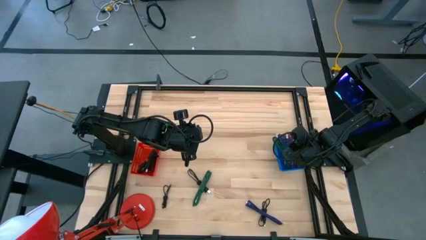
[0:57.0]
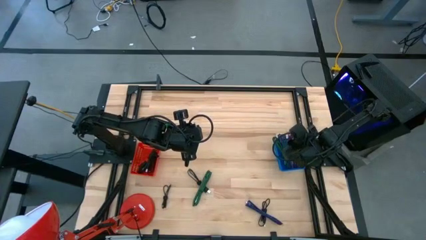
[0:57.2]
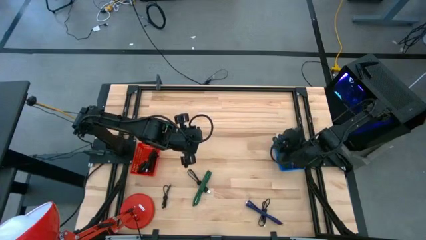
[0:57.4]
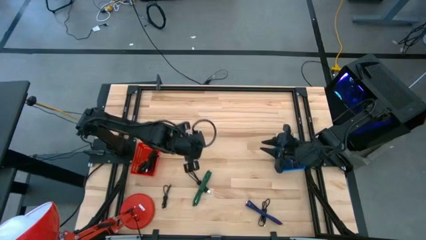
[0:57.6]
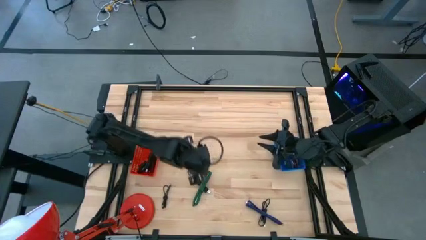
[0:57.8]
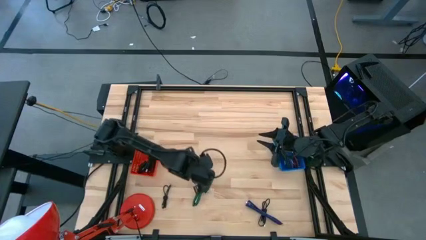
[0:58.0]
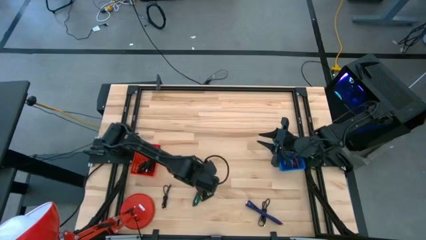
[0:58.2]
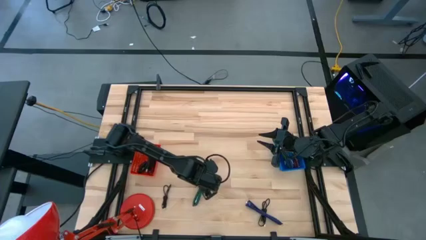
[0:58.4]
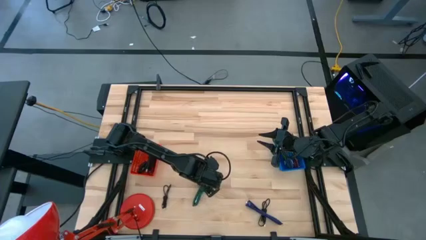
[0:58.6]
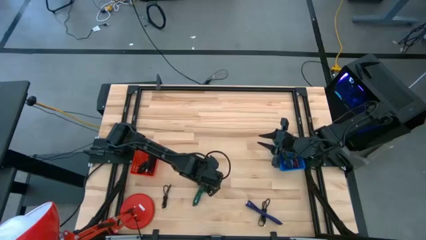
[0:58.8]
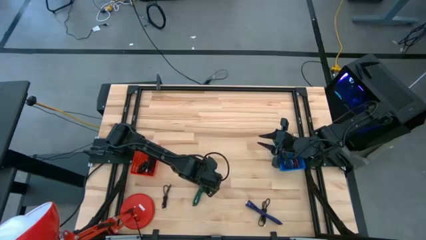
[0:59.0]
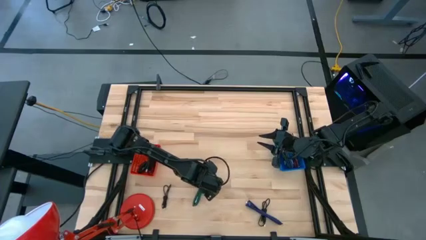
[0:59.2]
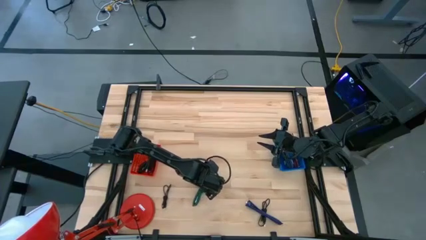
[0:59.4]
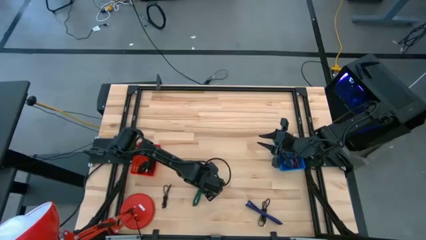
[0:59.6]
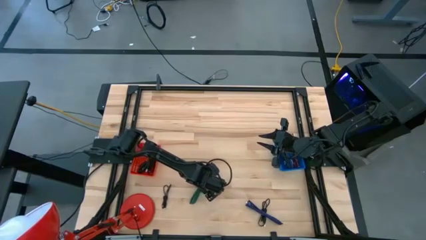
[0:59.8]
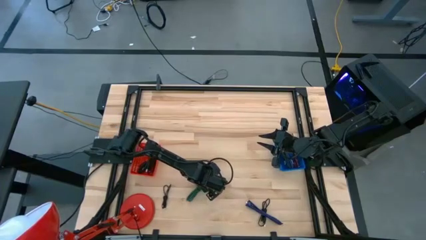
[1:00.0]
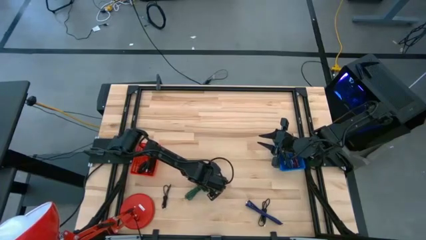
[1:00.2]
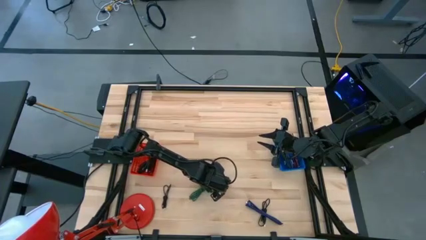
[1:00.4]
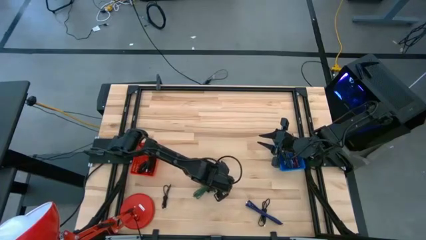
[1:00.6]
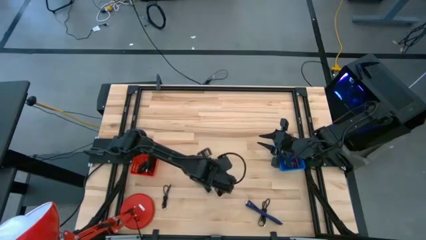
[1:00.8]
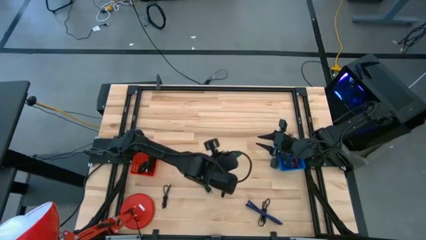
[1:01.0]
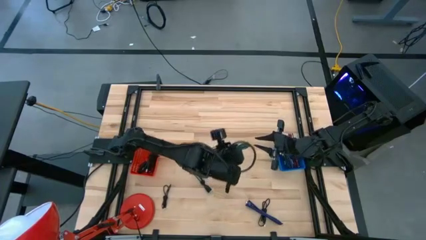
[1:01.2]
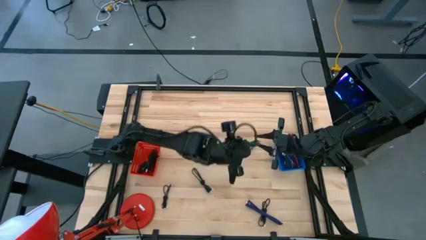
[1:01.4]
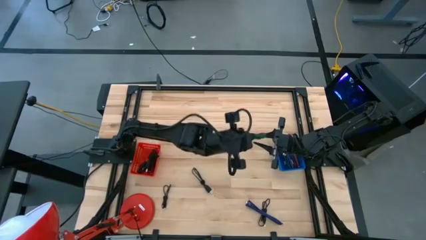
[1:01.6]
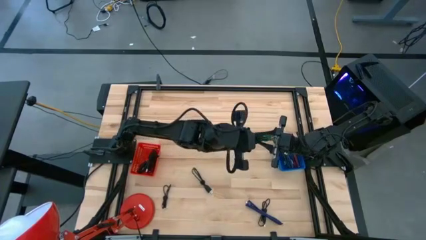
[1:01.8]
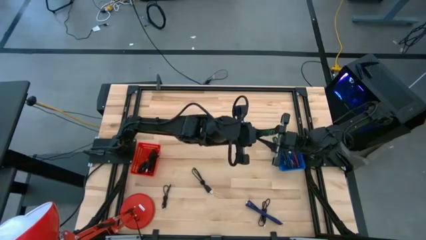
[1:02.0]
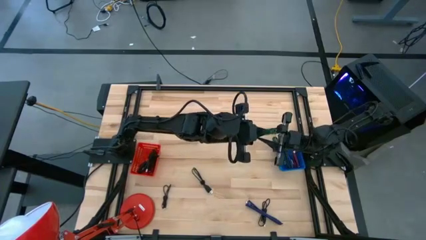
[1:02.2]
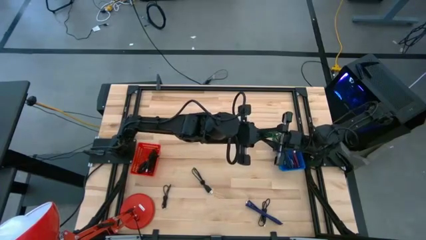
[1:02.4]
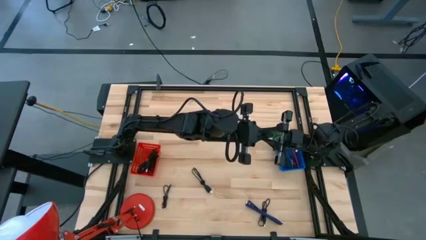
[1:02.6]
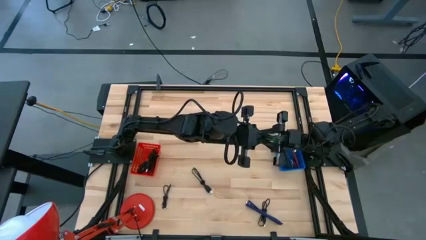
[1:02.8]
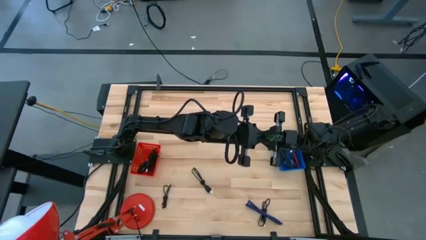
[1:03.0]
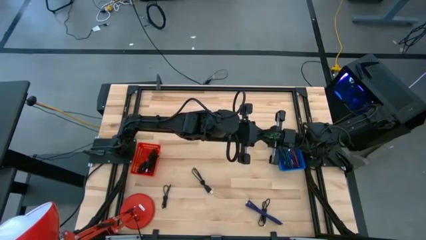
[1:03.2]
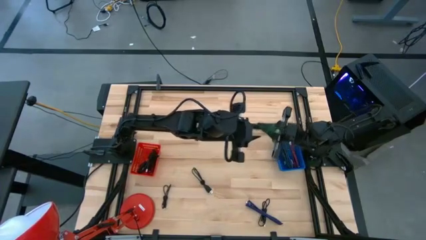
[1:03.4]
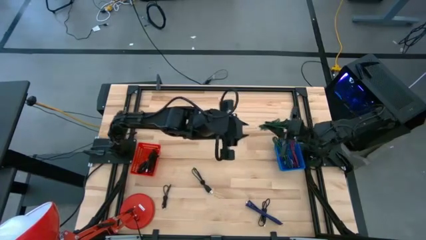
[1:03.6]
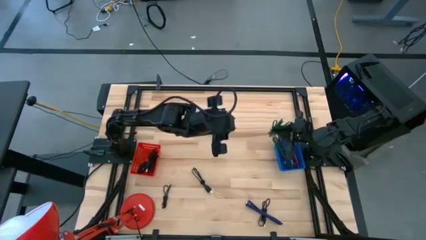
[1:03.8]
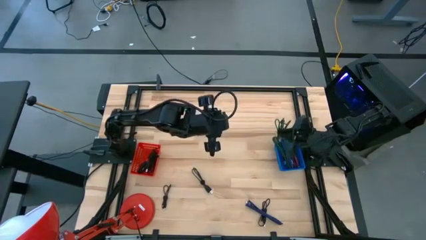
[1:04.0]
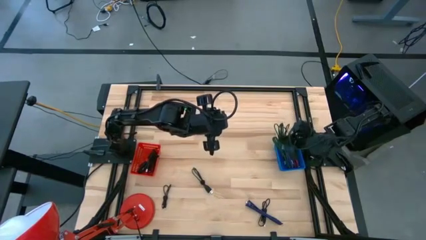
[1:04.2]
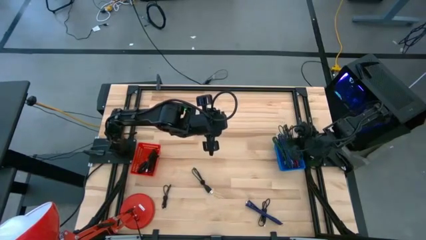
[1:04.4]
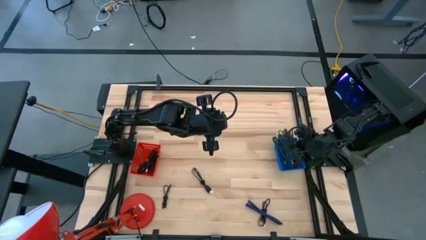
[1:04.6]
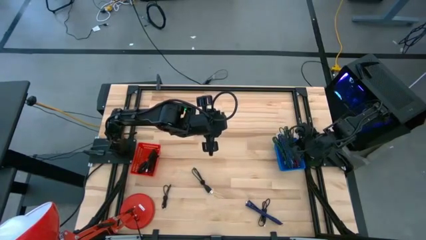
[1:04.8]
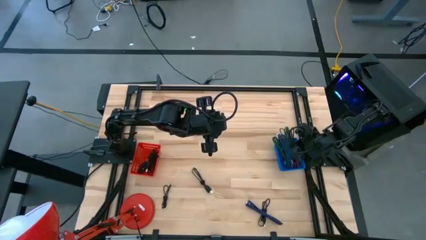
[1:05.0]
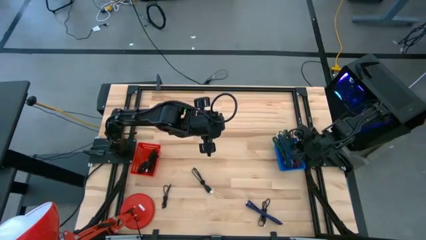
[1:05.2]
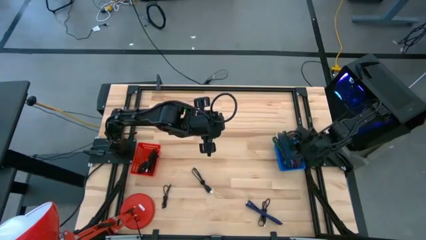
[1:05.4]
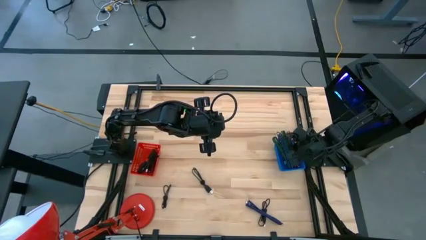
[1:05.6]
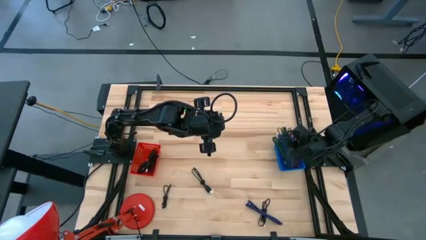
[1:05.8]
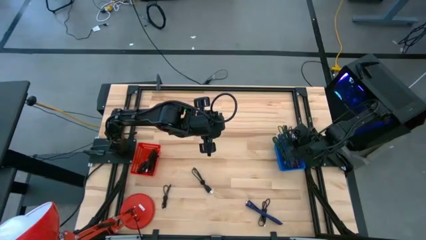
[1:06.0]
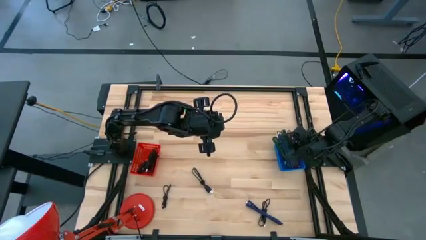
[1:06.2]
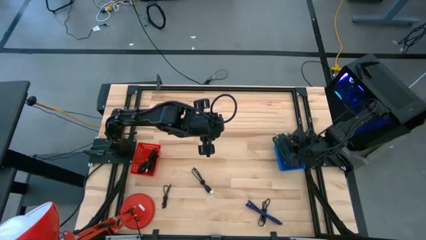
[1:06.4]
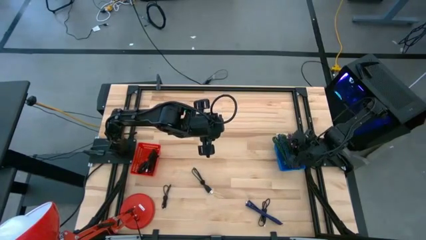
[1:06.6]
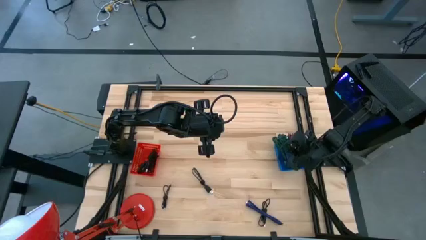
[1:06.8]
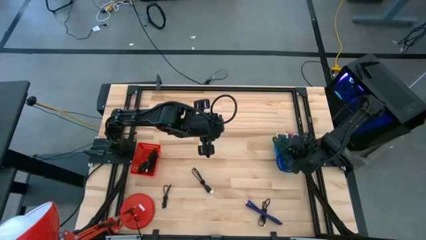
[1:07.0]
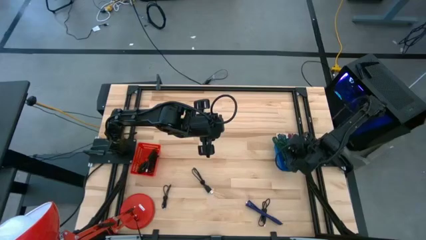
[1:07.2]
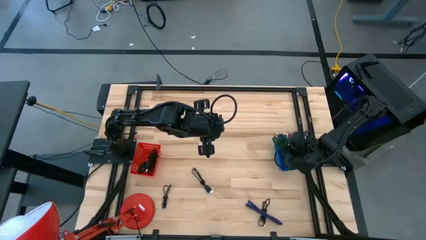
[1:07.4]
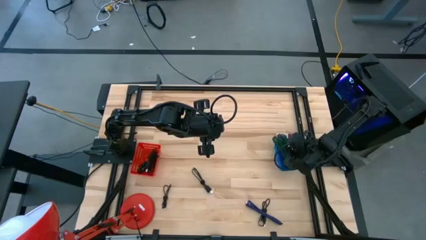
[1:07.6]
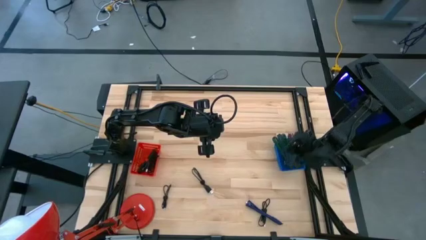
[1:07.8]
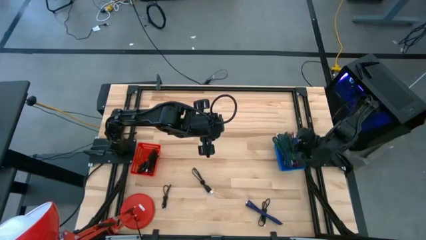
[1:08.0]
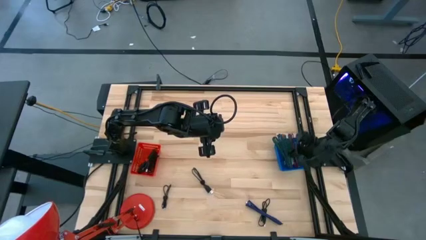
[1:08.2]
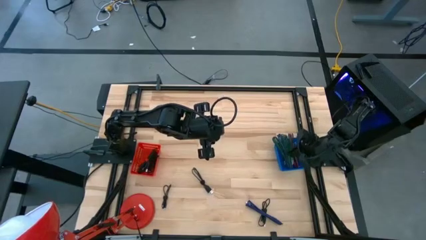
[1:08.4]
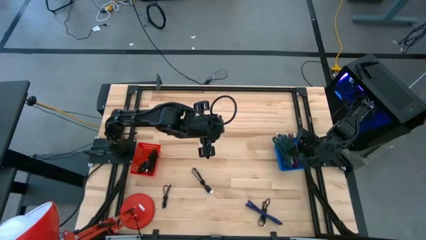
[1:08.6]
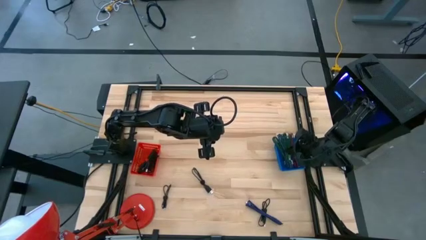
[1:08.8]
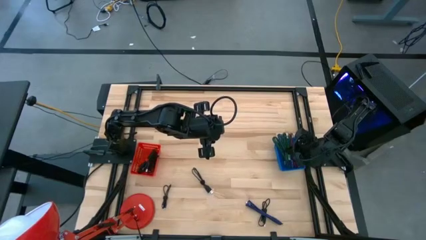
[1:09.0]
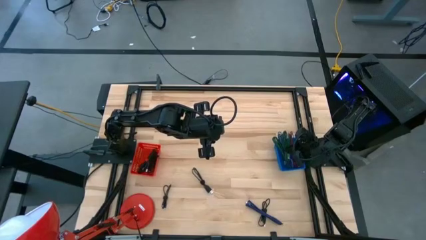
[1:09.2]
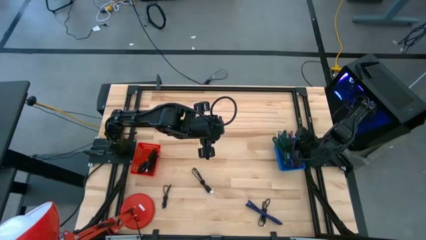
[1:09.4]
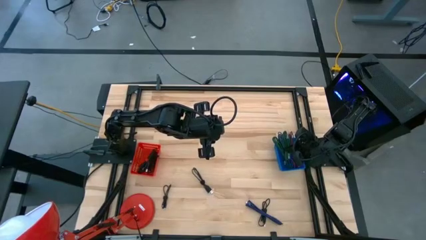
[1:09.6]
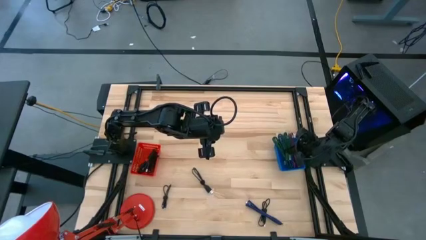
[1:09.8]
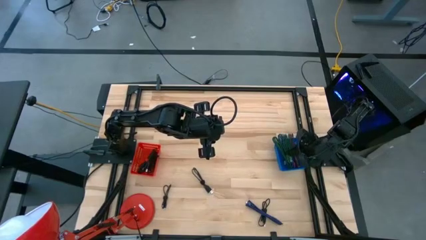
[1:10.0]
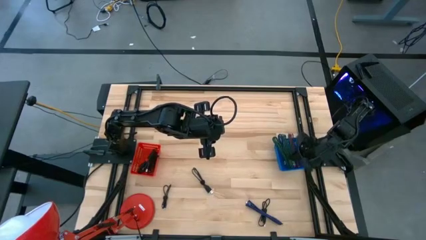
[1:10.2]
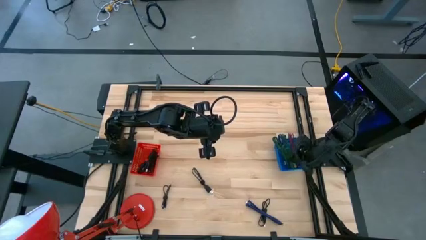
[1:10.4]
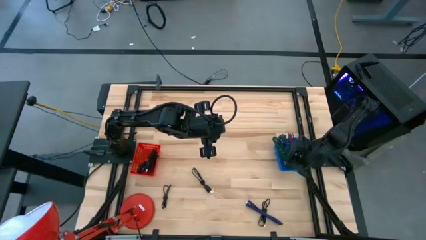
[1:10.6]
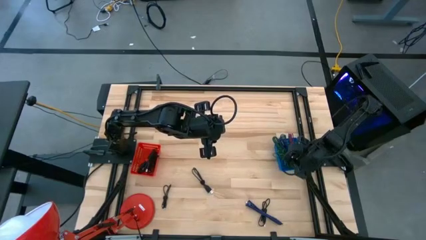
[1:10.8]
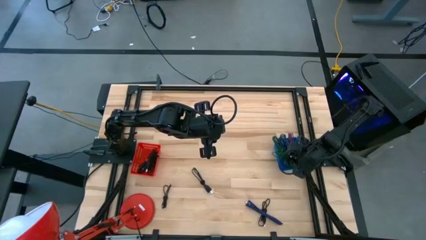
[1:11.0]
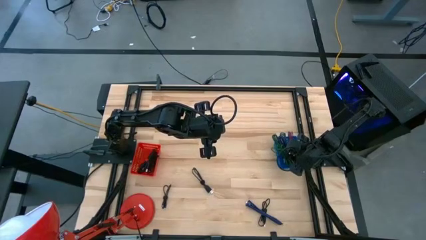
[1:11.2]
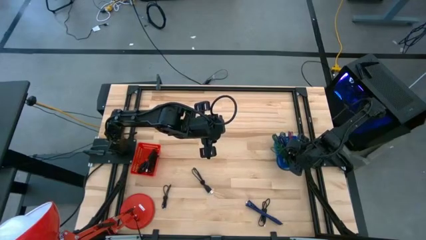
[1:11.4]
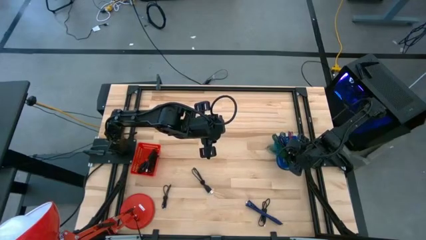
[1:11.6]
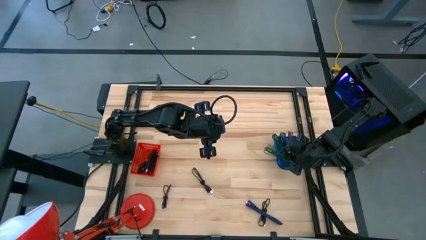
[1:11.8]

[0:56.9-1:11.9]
Task: Pick & Place USB Port
Put the green charger cable into the blue bin

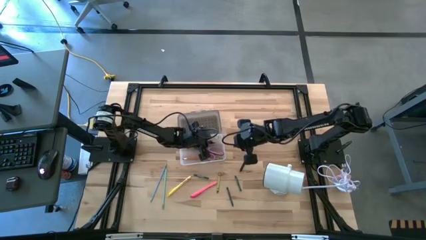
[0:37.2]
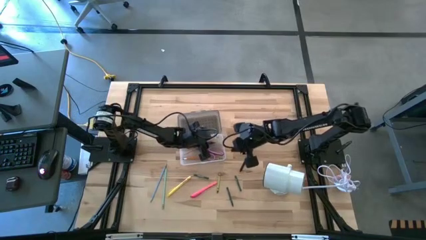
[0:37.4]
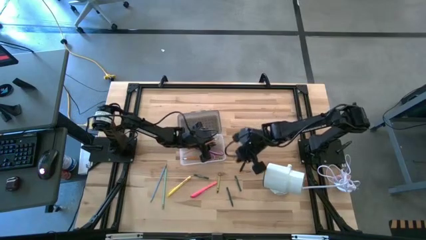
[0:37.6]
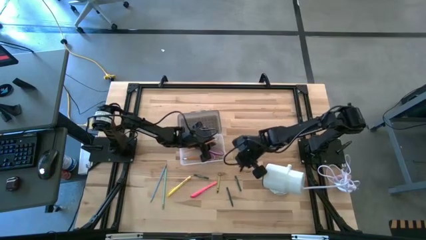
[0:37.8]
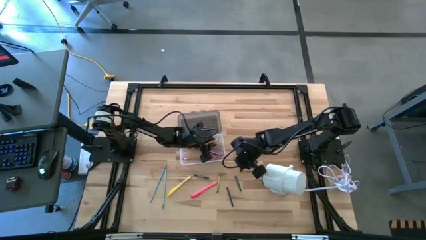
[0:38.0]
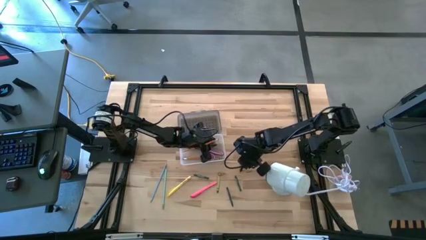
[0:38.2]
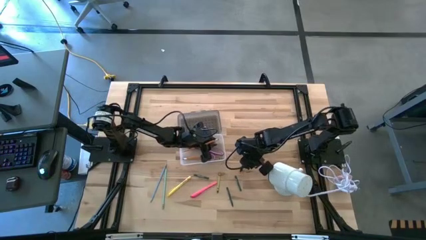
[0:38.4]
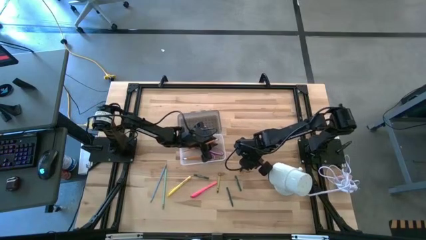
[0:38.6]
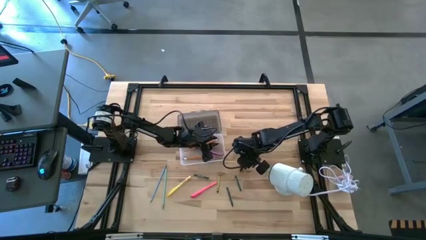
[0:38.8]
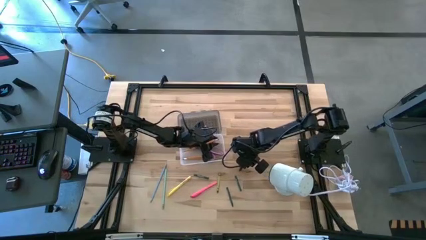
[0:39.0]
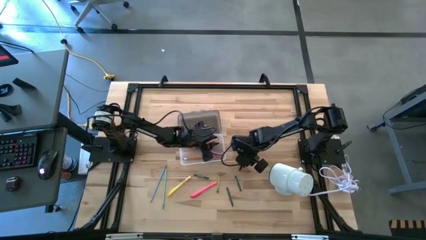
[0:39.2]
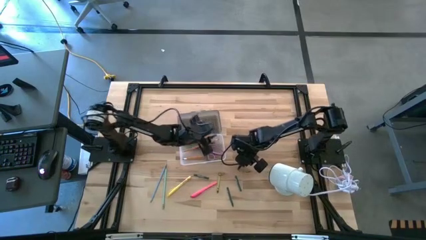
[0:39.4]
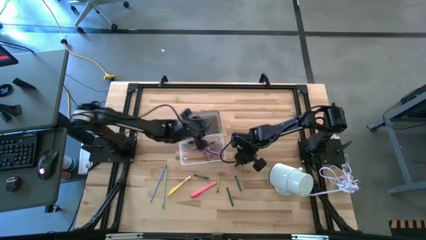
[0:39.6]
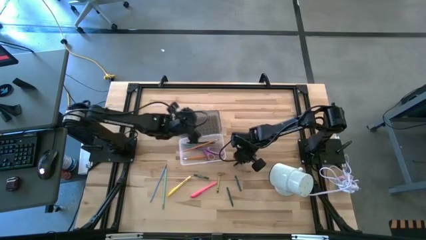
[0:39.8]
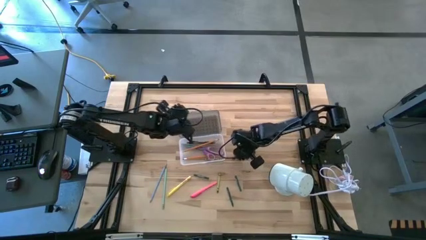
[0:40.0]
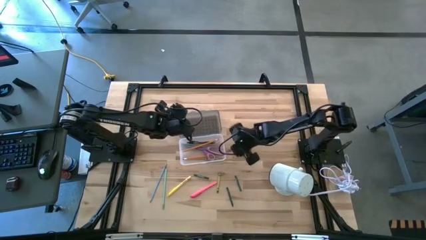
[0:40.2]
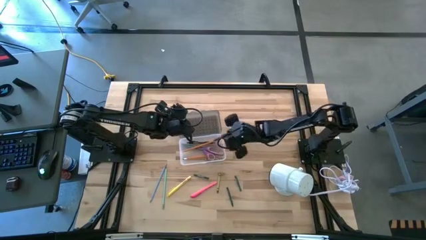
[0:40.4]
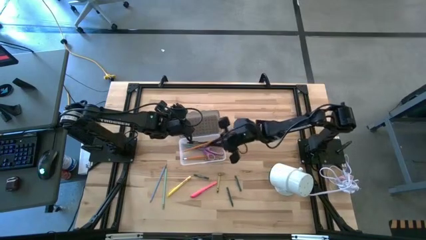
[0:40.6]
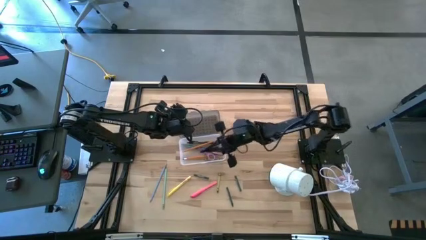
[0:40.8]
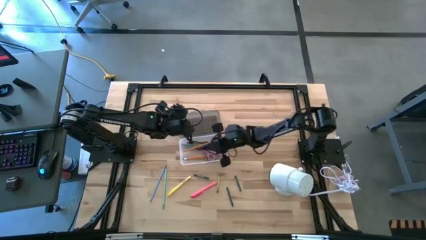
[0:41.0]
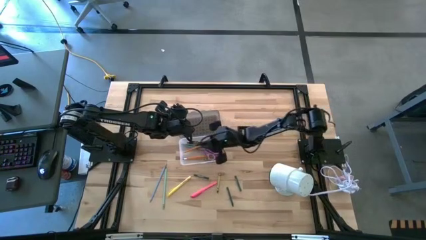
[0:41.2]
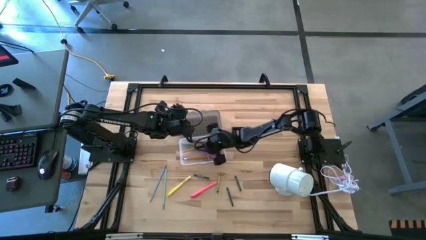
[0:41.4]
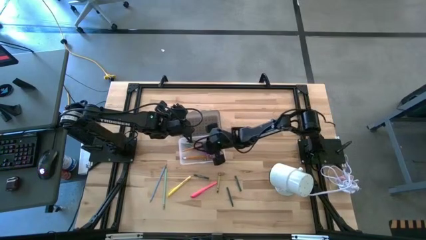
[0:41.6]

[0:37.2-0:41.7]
Task: Pick & place school supplies into a supply box
Put the black pen into the gray supply box
